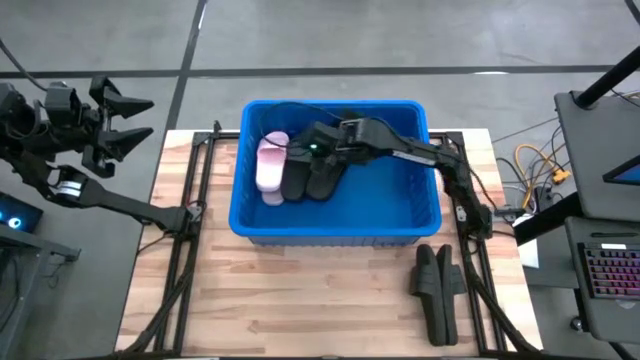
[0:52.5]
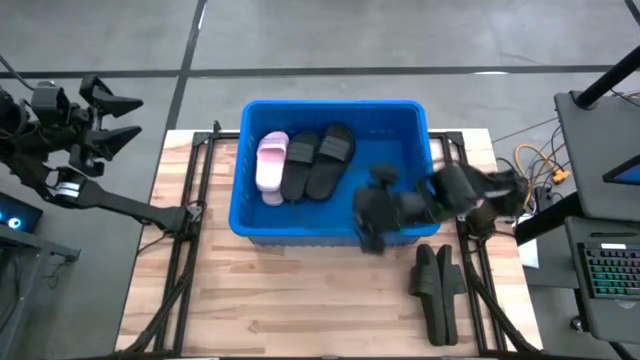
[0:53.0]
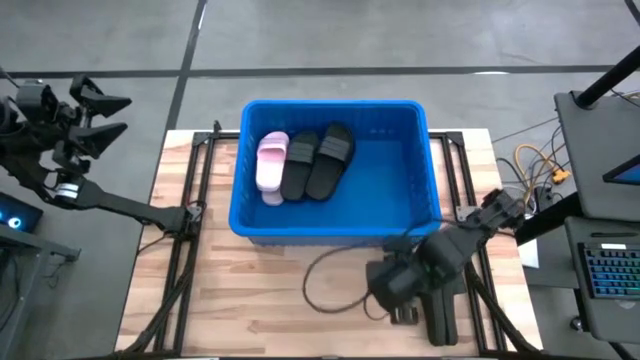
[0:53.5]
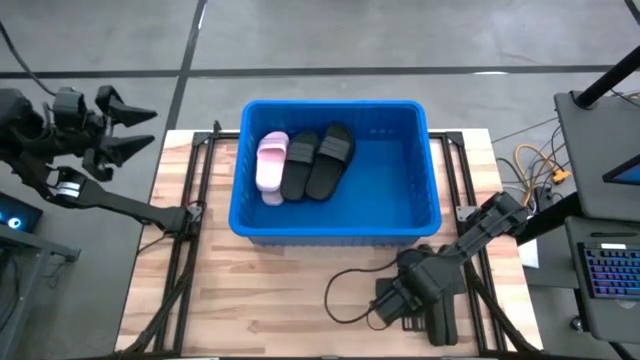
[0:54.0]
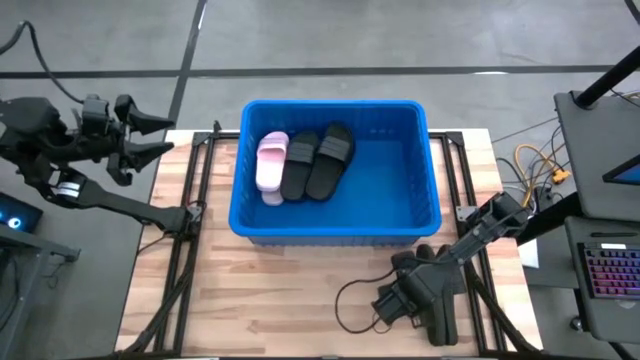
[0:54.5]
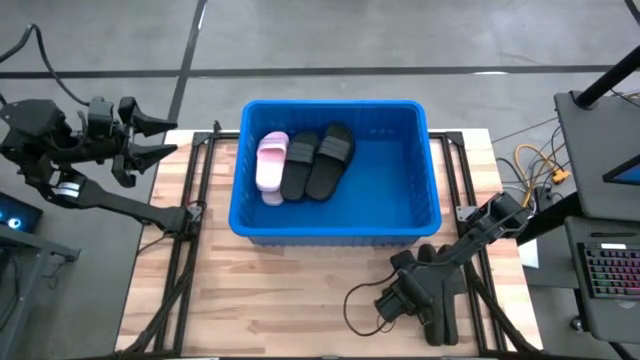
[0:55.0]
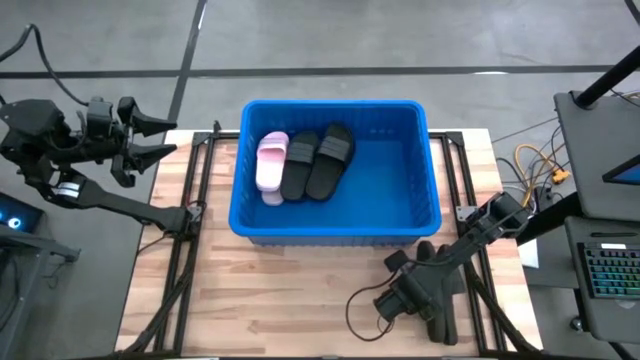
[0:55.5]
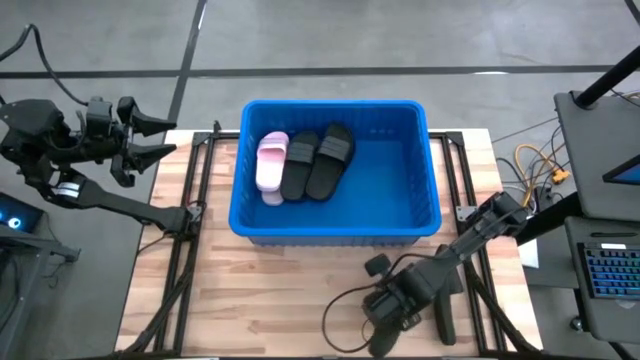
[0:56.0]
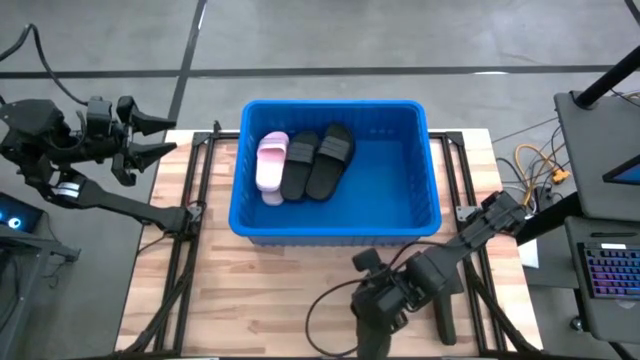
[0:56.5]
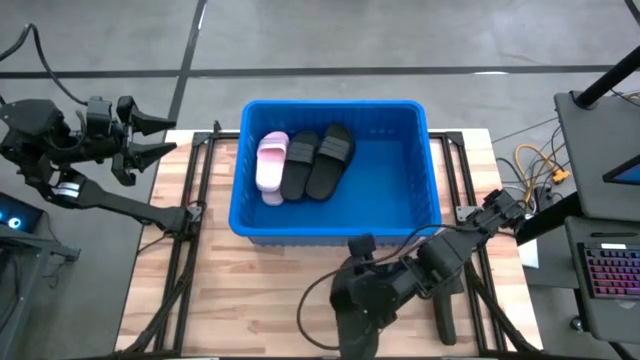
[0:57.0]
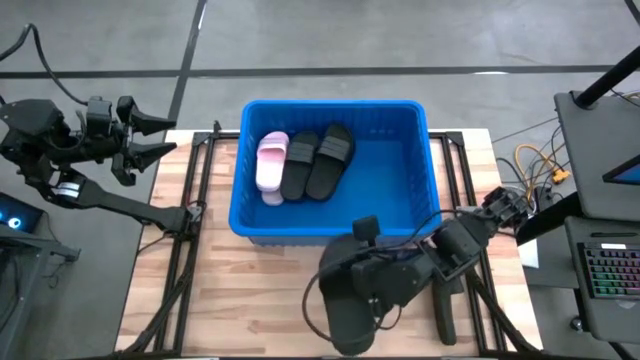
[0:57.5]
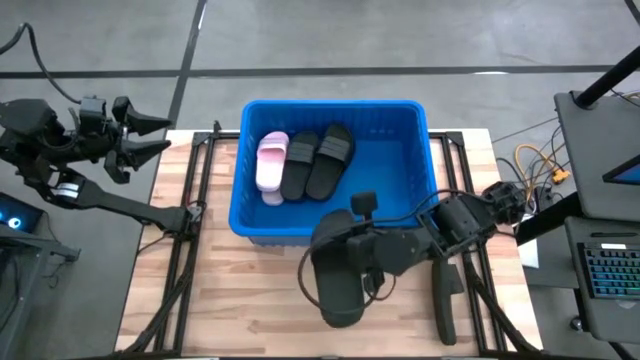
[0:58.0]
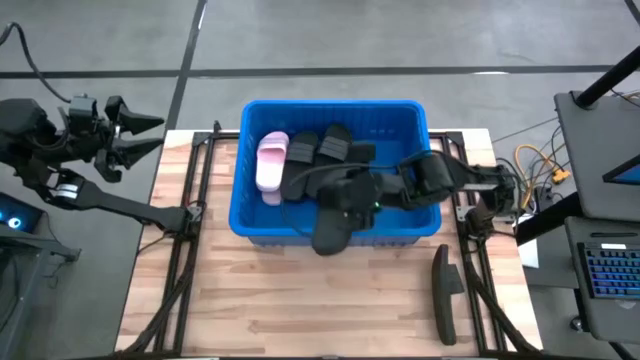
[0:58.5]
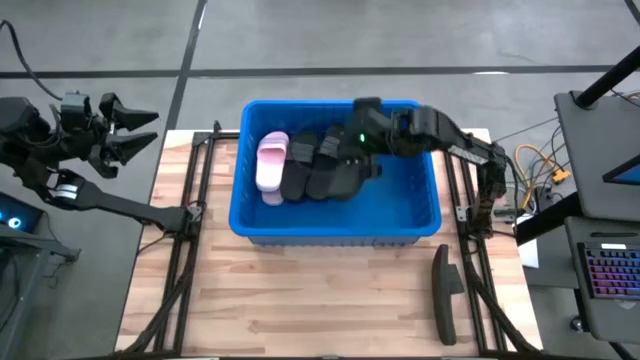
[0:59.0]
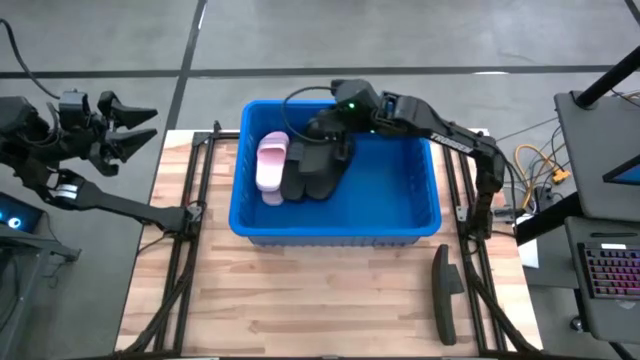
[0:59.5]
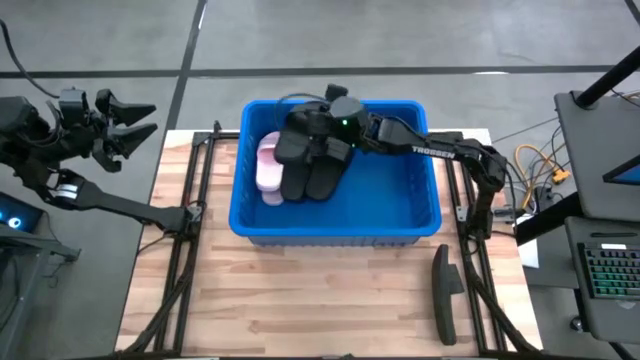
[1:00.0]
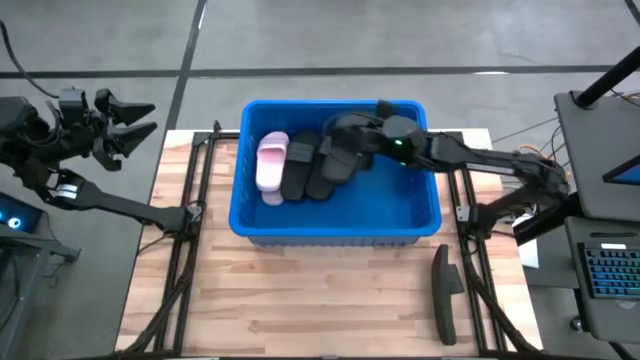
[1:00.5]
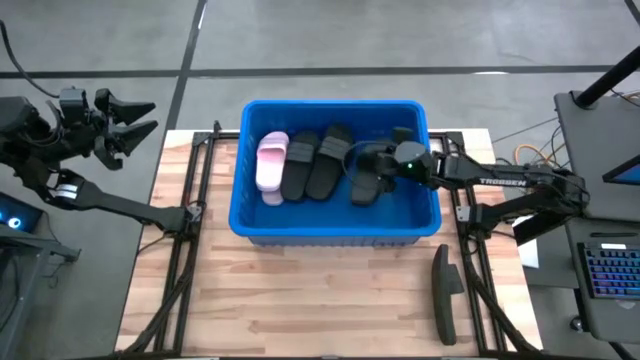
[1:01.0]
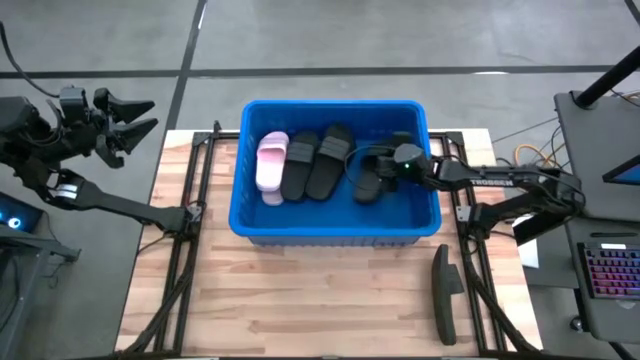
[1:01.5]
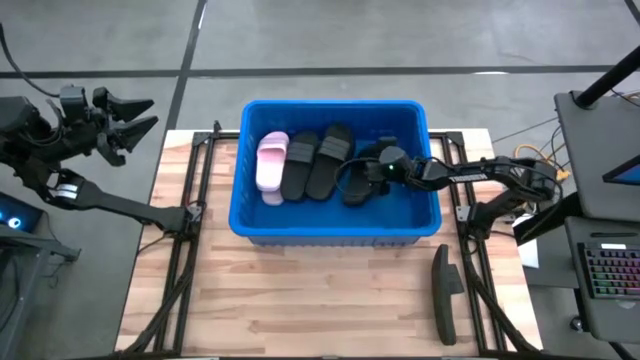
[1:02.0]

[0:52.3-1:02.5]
Task: Pick and place slides into bin
Put the left black slipper into the blue bin

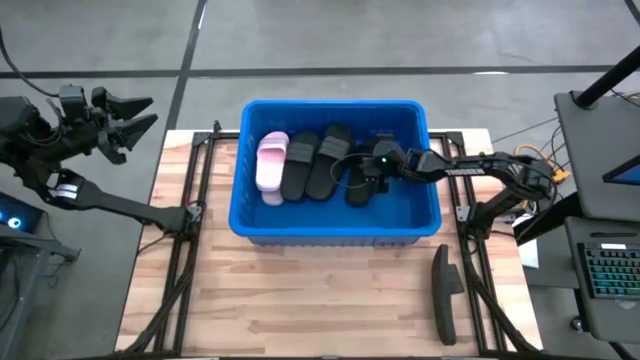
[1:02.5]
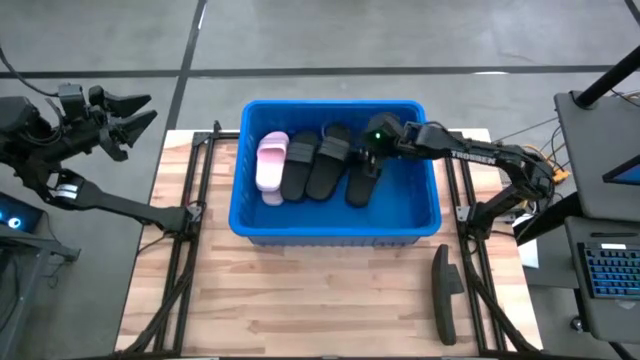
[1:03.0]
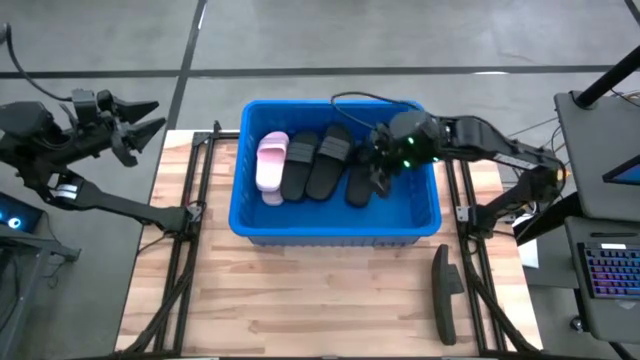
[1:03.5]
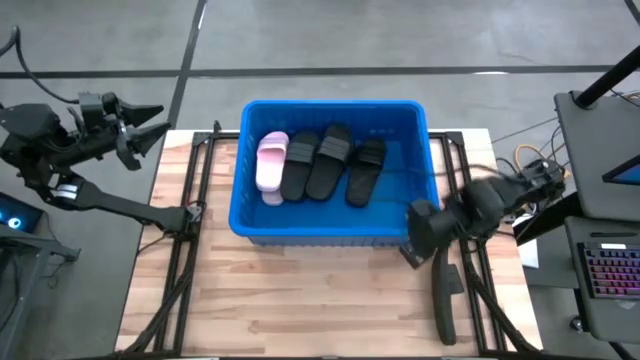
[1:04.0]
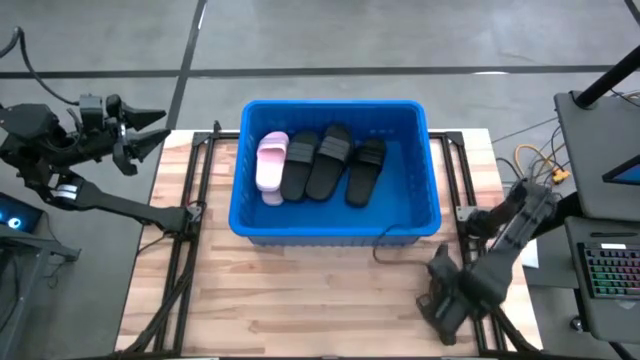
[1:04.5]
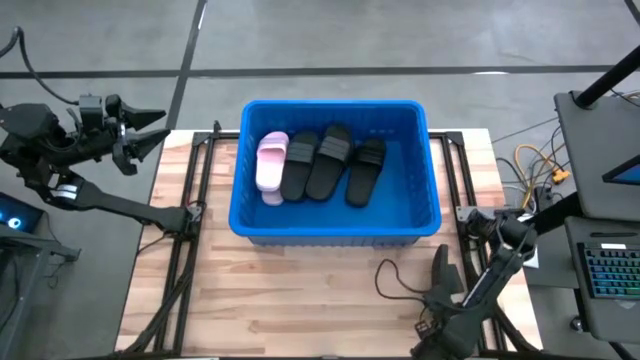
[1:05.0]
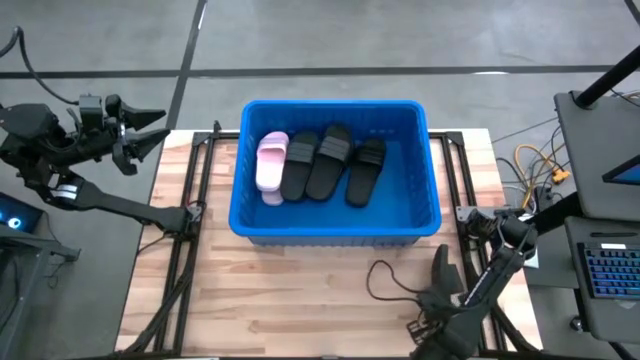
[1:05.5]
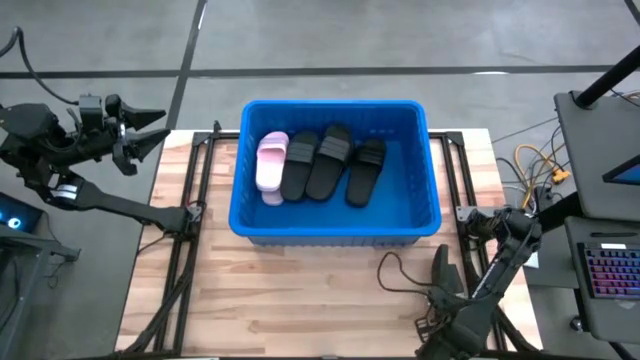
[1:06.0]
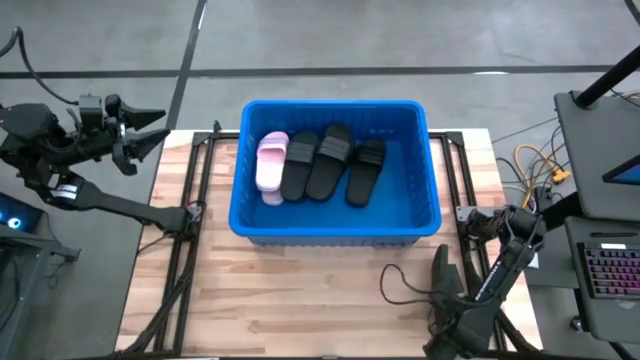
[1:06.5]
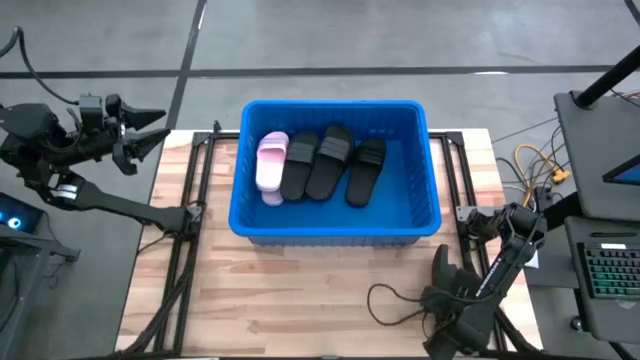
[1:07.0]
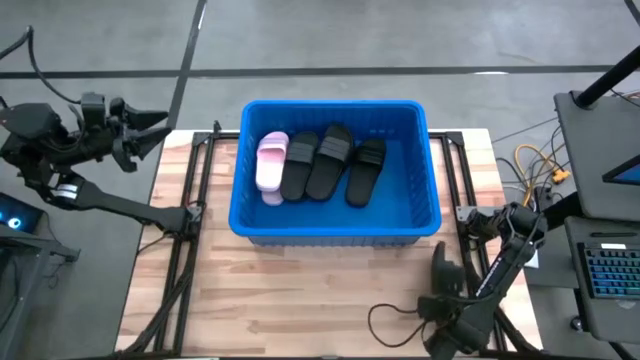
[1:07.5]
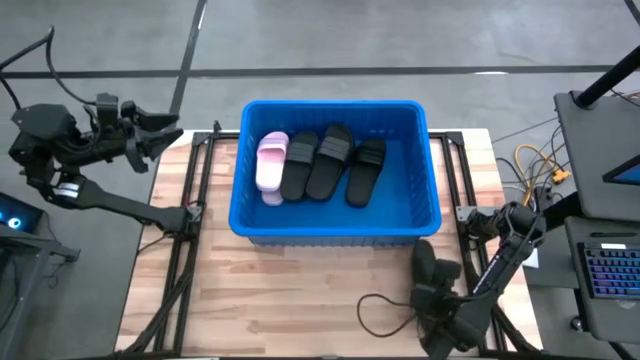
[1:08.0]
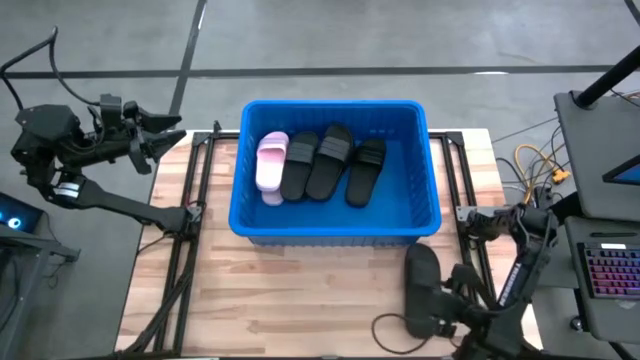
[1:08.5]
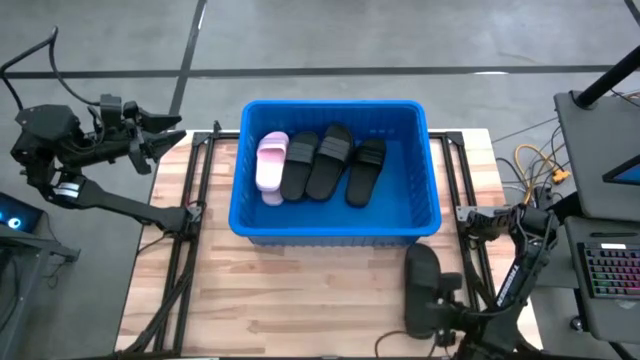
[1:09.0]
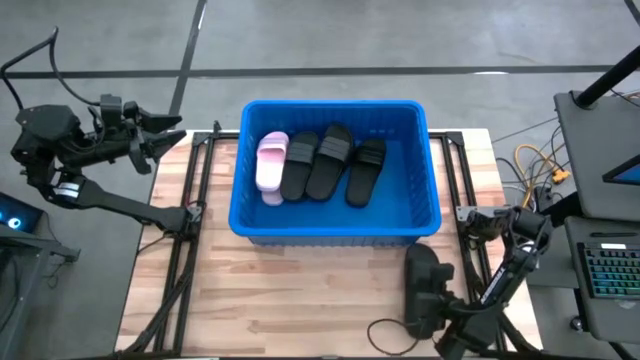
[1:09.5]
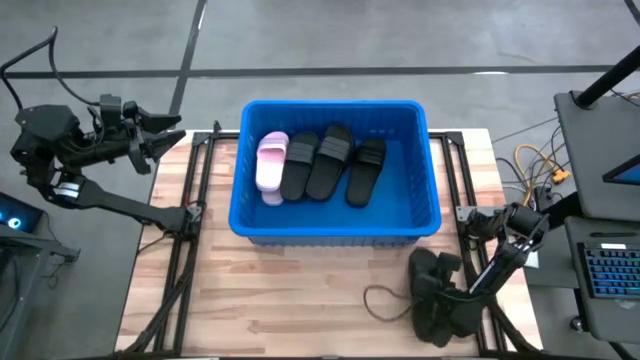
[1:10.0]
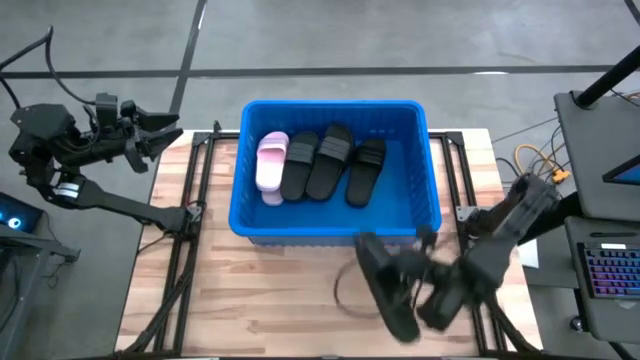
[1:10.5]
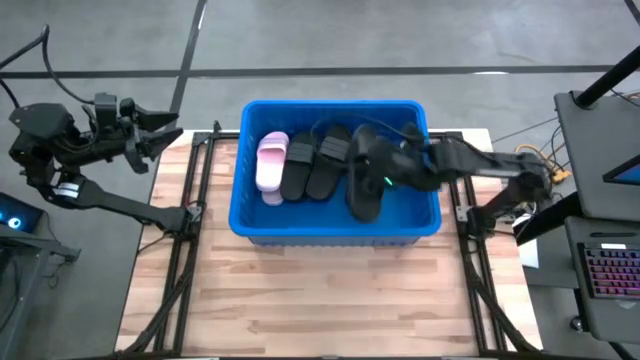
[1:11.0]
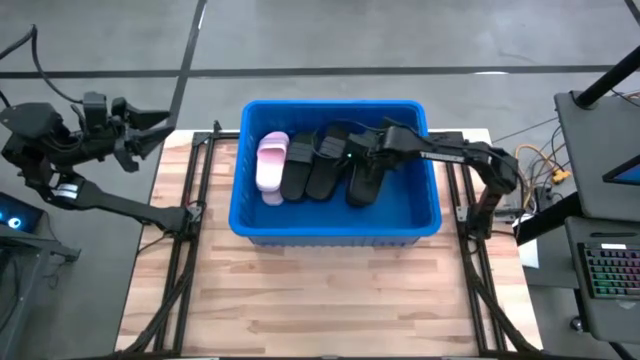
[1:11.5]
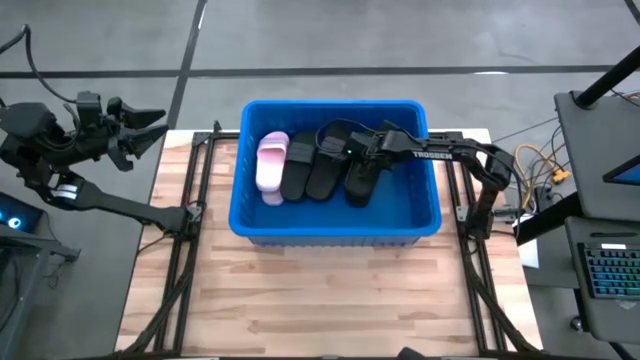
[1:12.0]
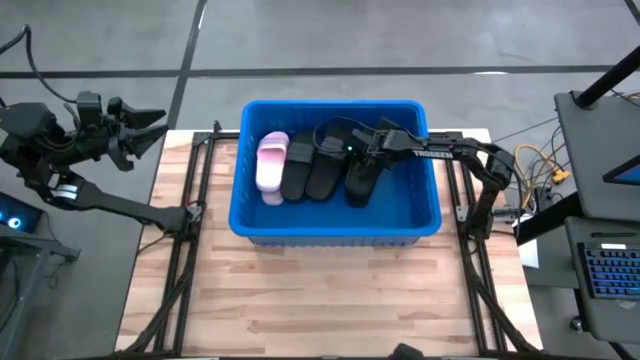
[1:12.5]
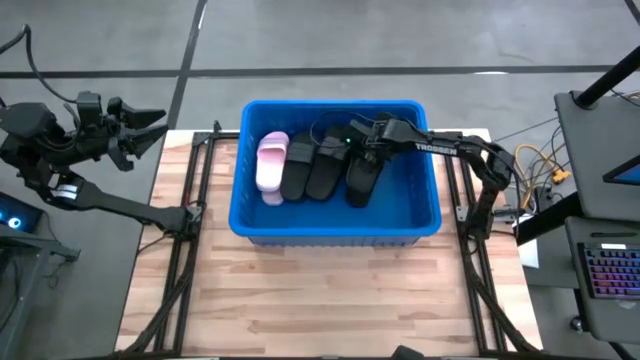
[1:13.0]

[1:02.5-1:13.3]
Put the black slipper into the blue bin
